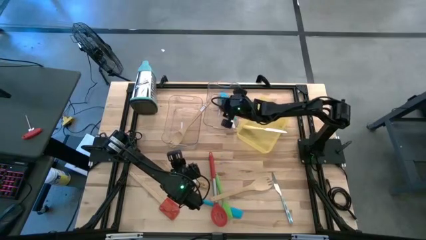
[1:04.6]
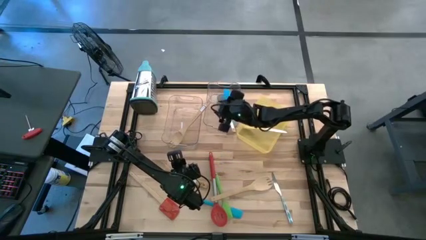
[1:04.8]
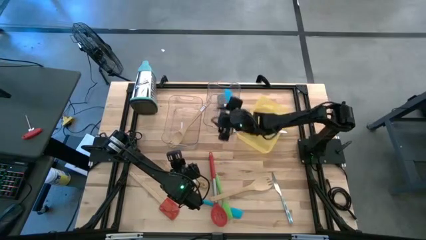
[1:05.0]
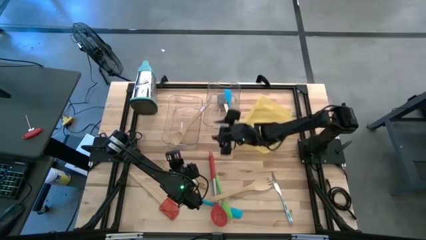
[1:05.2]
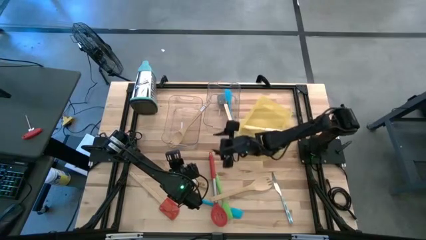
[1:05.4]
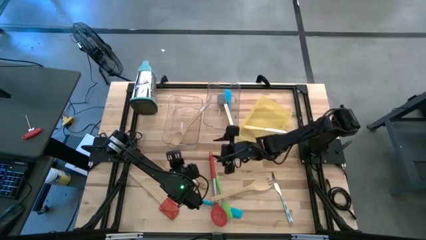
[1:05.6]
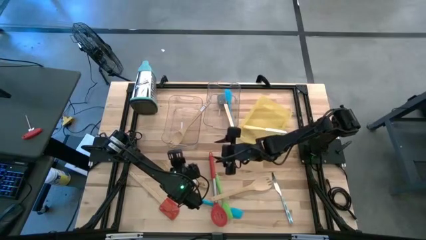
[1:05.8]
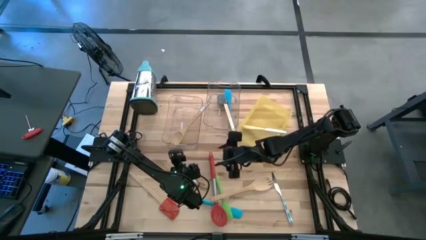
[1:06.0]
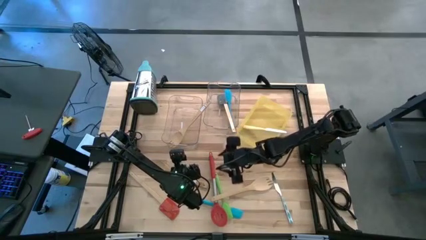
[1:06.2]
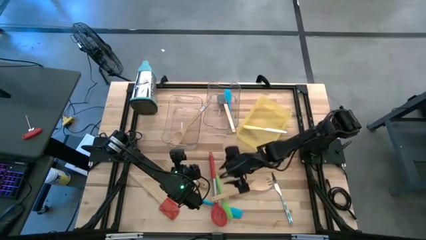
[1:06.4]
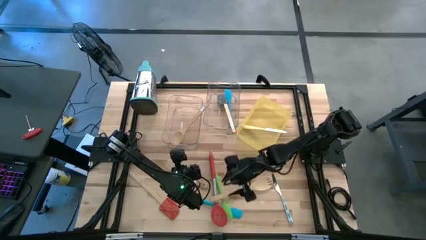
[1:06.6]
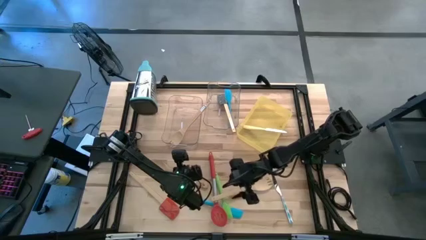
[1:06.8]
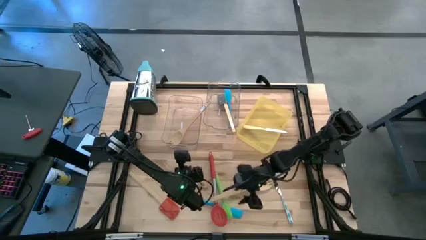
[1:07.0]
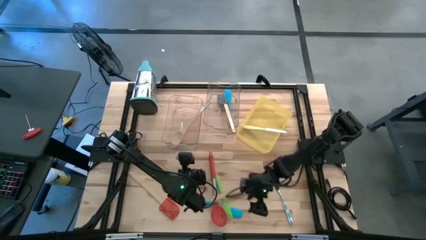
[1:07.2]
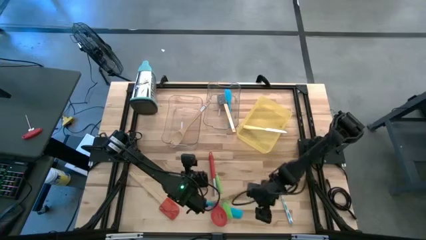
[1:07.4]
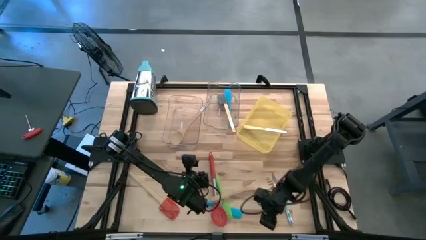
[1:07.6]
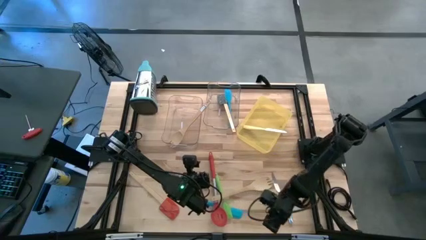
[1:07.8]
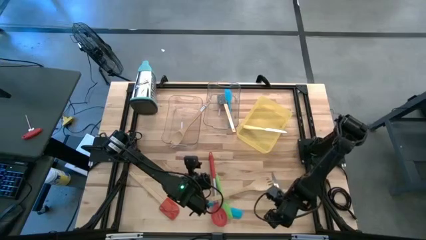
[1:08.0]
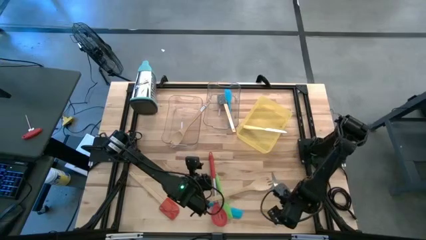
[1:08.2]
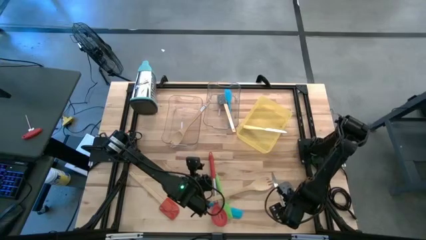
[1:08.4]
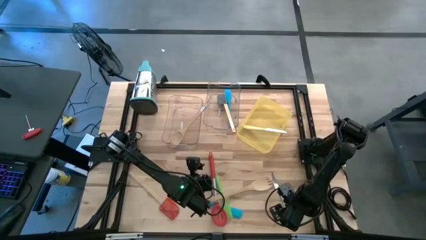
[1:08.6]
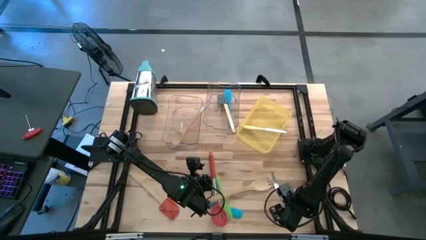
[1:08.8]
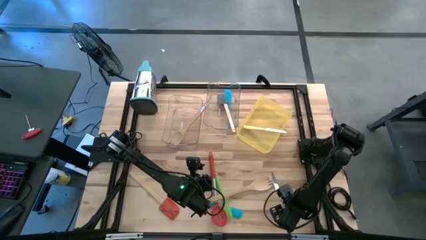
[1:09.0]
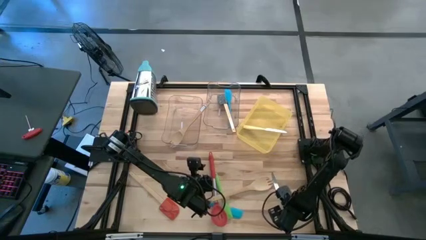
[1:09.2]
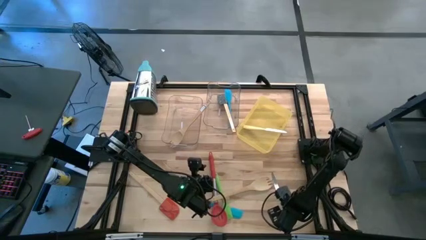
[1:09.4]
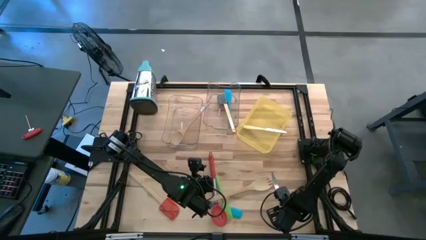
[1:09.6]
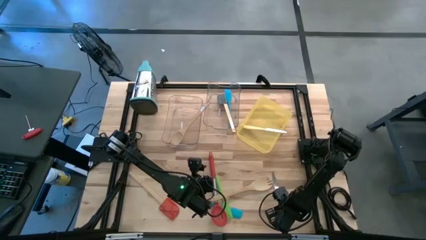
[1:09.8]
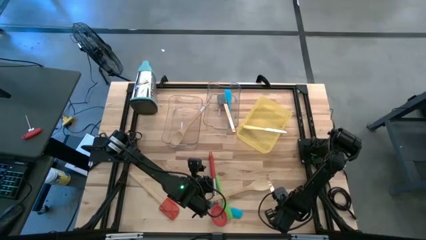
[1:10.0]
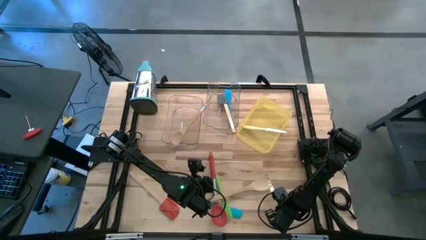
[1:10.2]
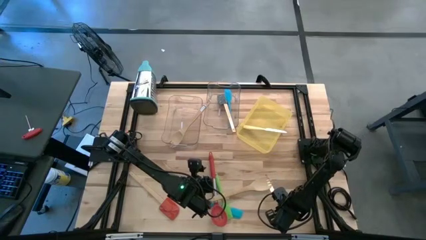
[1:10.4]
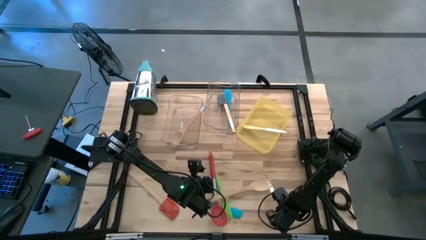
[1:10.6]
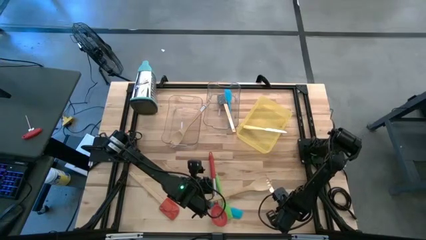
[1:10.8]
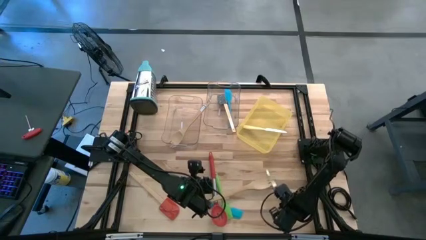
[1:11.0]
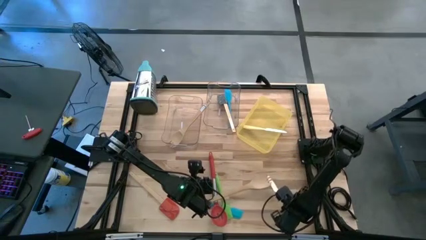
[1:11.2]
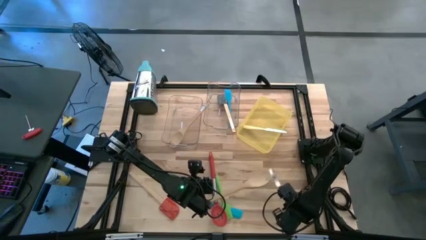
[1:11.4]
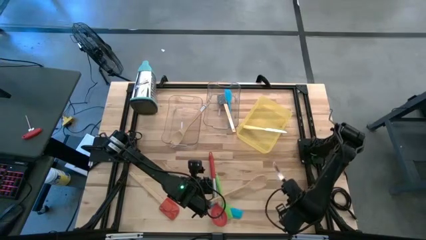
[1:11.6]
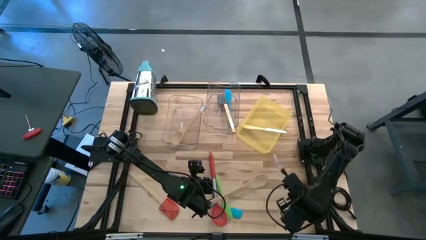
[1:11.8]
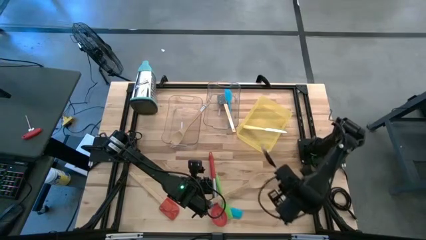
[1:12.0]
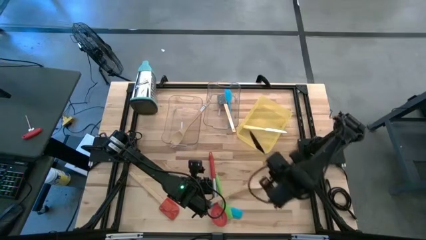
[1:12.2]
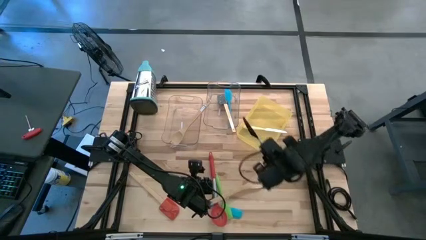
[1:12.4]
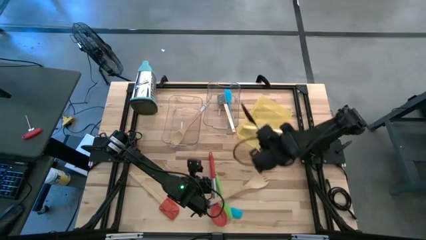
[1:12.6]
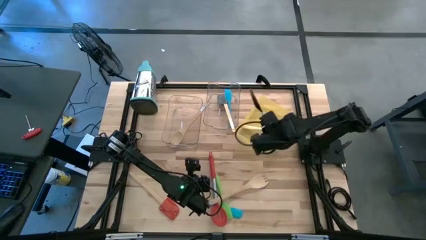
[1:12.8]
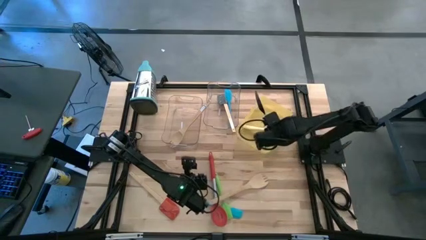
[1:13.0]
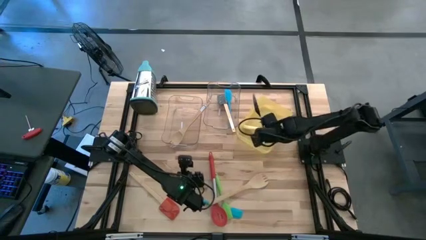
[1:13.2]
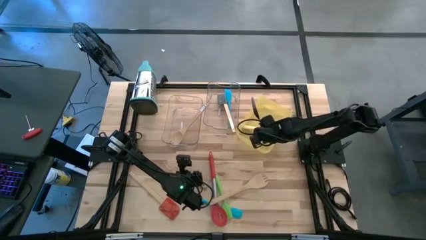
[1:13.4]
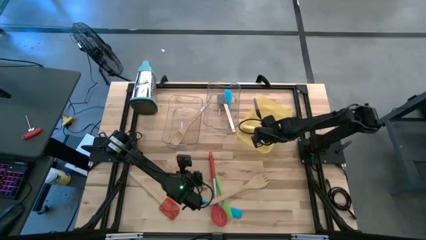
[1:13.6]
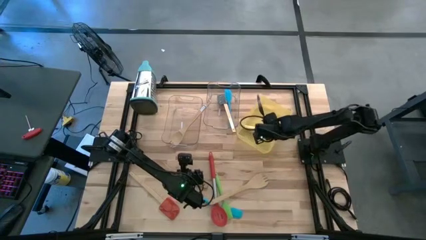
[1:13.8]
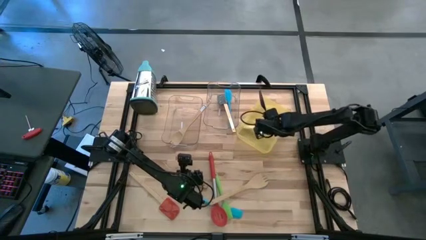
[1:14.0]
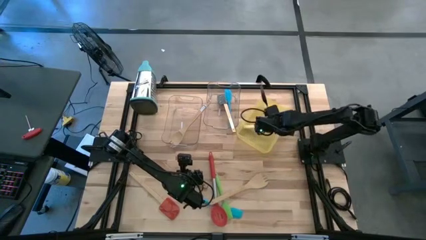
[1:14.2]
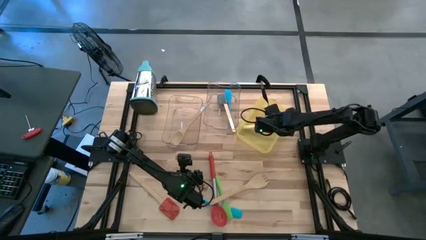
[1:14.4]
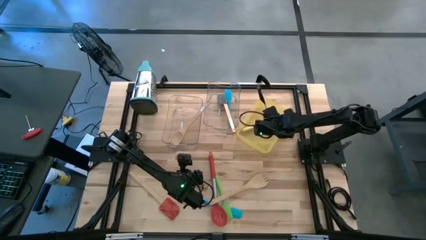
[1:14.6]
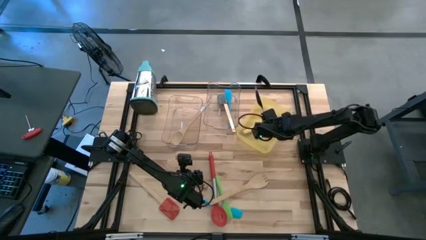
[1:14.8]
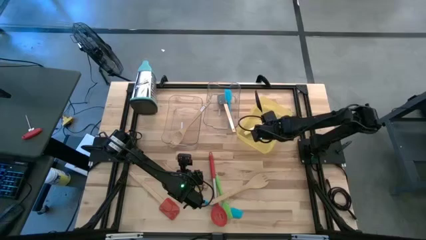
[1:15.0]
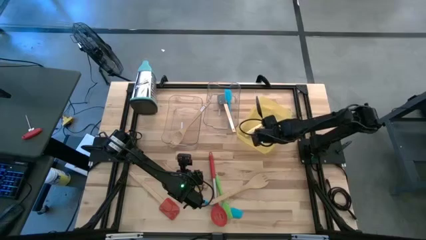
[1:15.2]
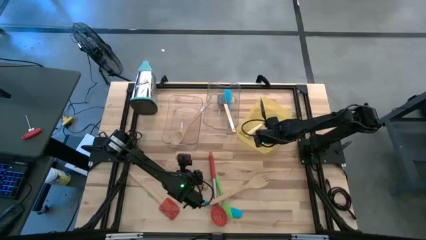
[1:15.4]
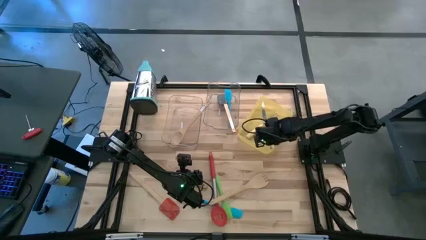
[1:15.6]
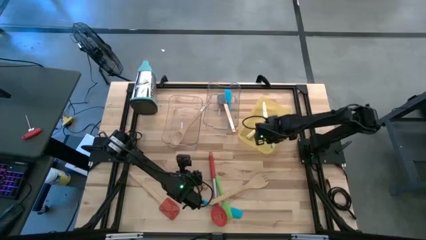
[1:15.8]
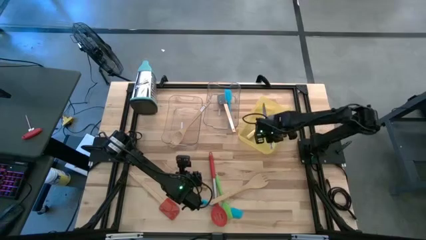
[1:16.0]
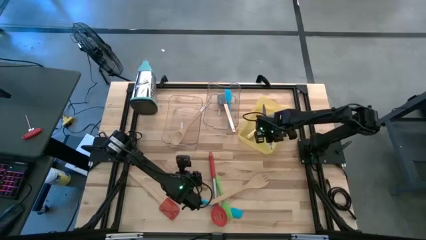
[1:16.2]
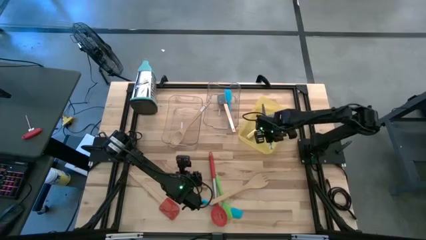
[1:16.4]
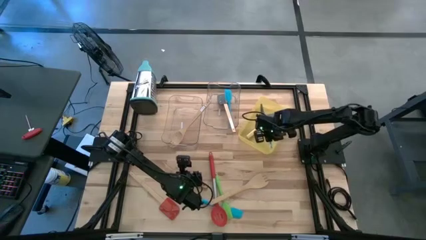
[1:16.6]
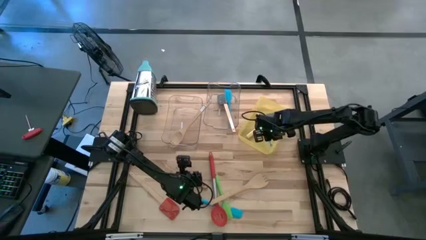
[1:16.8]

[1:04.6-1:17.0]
Task: Pick & Place Kitchen Items
Put the white kitchen knife into the yellow bin

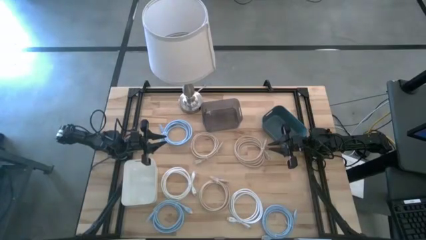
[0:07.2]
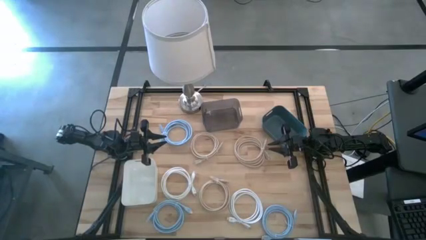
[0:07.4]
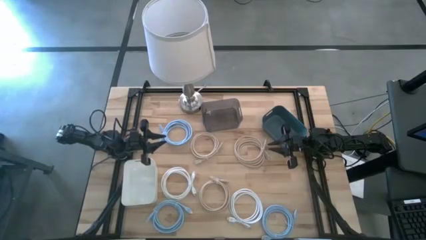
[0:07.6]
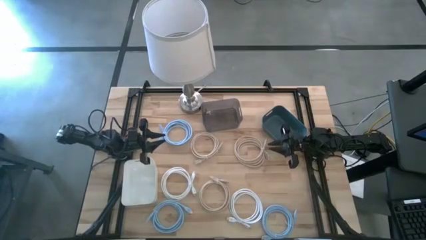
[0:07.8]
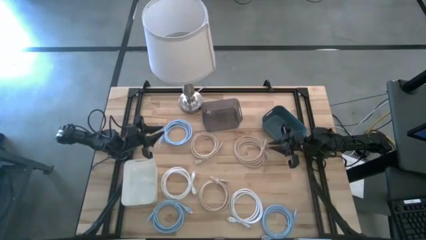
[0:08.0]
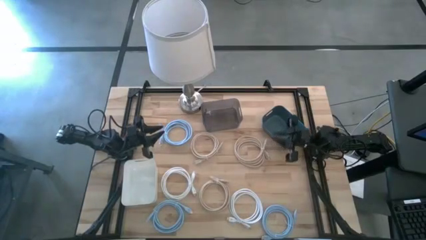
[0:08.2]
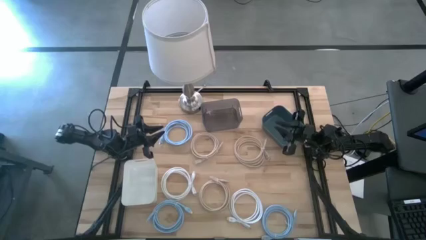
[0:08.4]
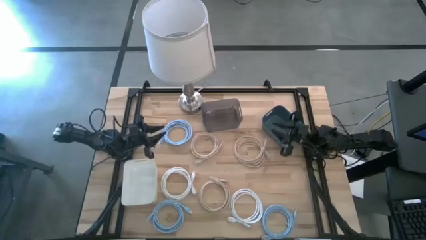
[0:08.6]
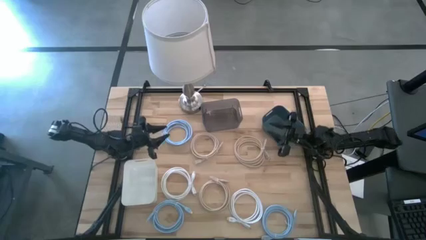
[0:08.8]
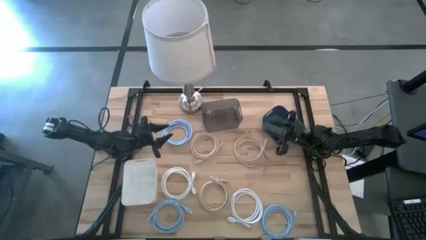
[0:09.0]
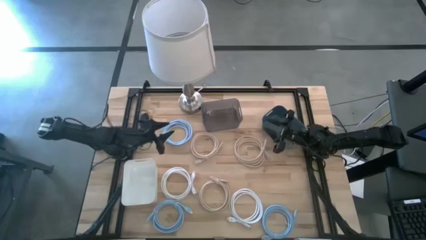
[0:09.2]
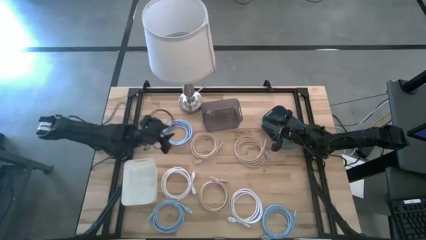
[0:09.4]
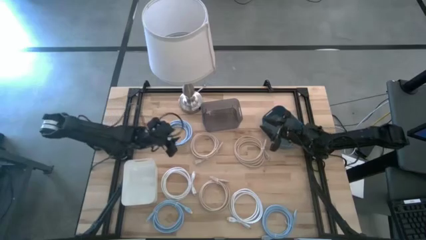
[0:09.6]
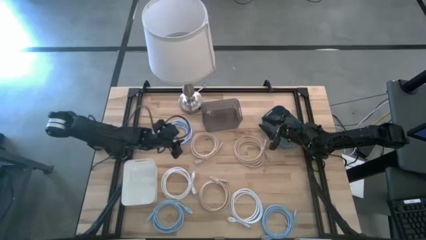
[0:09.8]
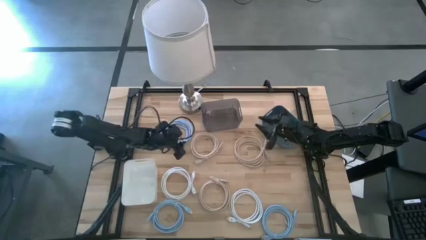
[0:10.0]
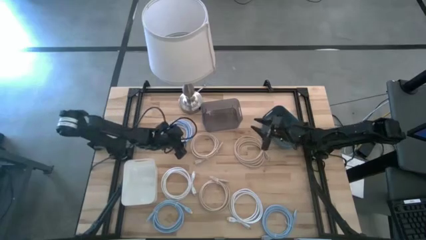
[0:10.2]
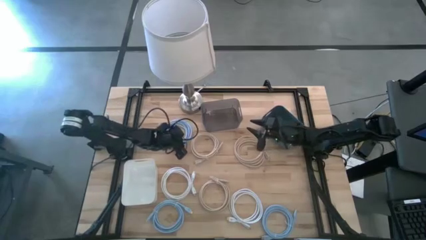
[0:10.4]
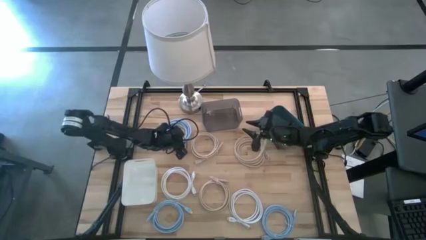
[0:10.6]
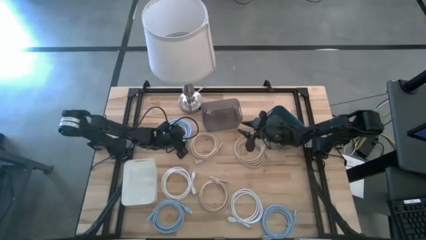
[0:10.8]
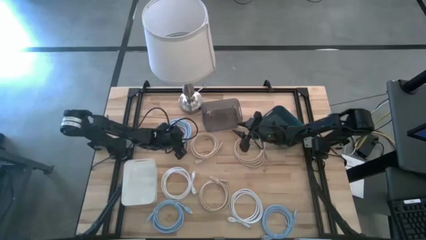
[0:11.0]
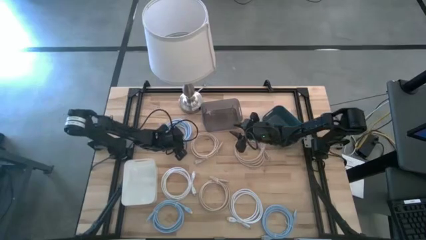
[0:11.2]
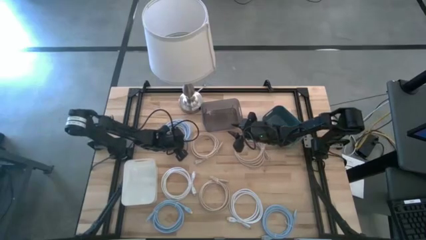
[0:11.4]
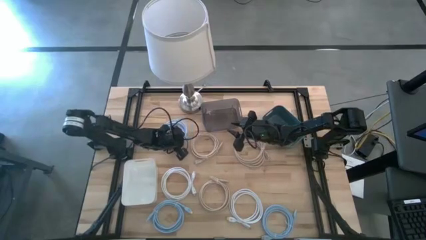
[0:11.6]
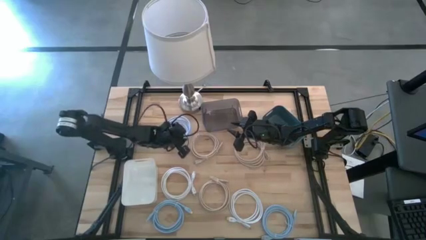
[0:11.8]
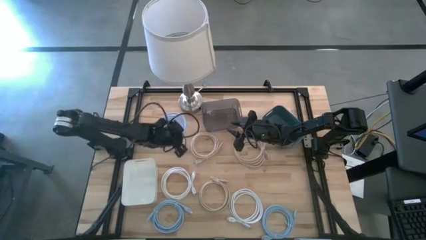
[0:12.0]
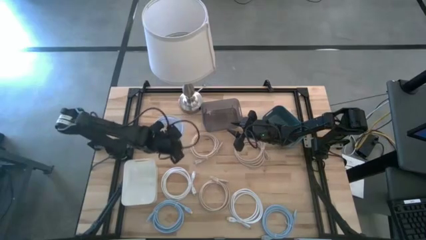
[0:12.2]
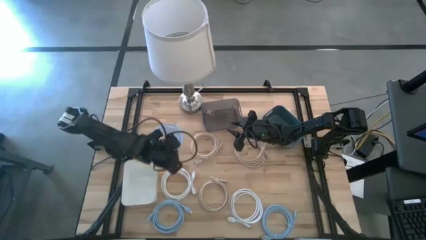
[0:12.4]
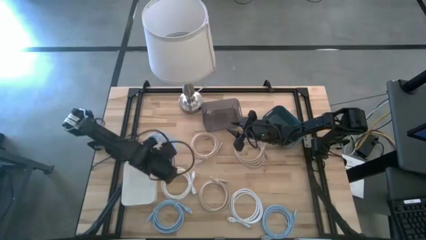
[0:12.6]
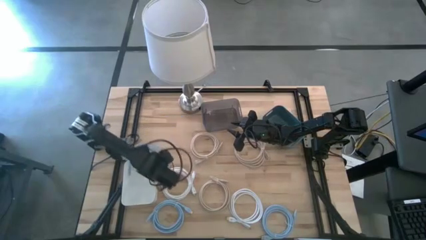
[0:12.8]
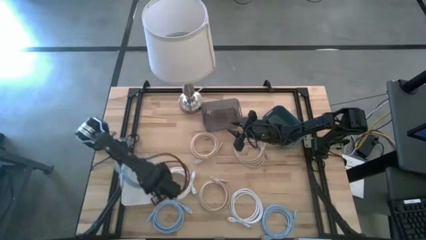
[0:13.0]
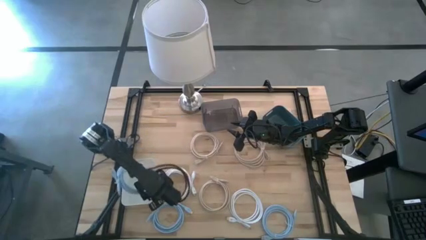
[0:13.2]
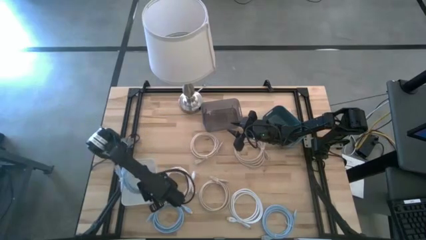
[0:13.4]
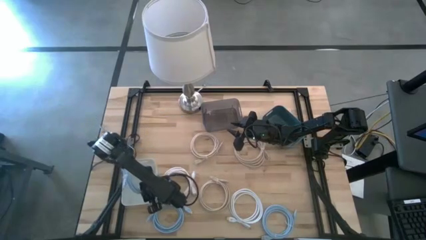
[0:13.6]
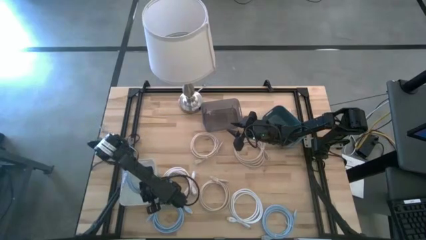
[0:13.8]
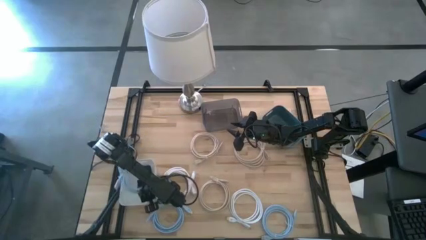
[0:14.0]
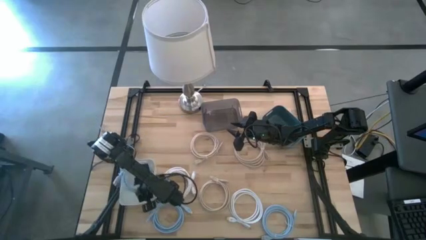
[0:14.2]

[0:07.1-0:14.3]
Task: Sort HDMI cables
Put the top light blue HDMI cable into the white bin
